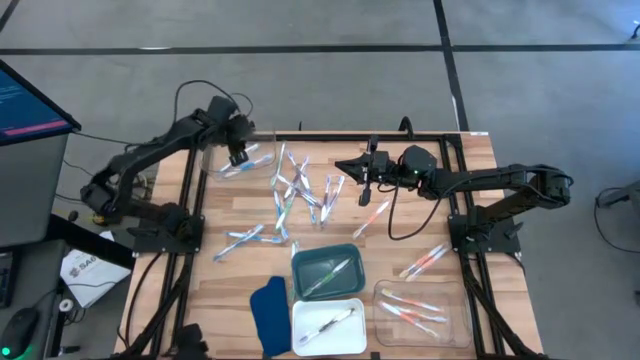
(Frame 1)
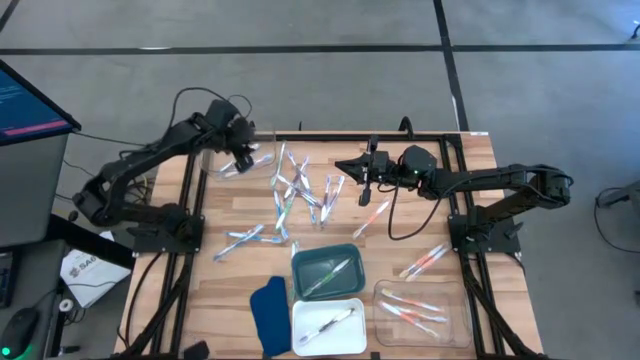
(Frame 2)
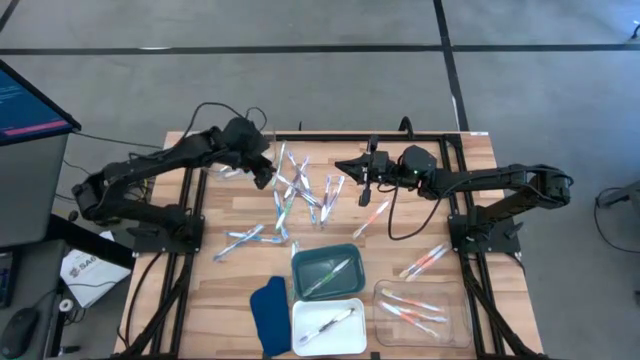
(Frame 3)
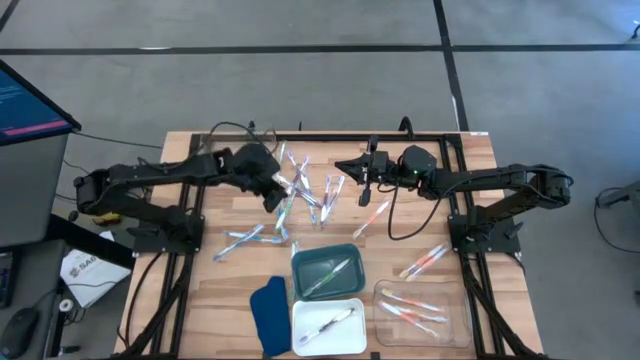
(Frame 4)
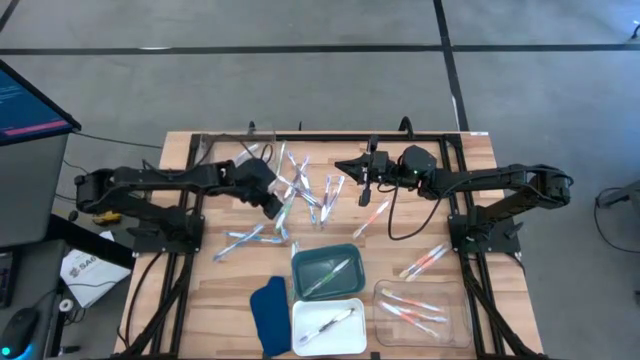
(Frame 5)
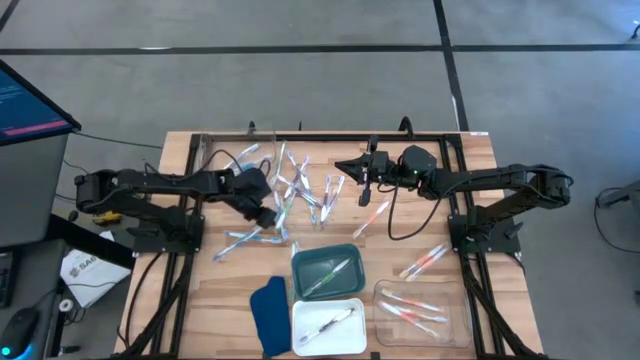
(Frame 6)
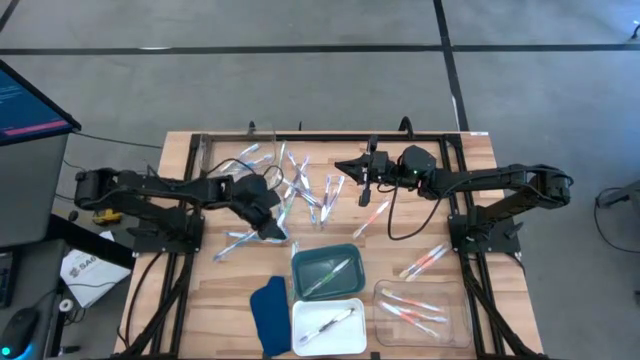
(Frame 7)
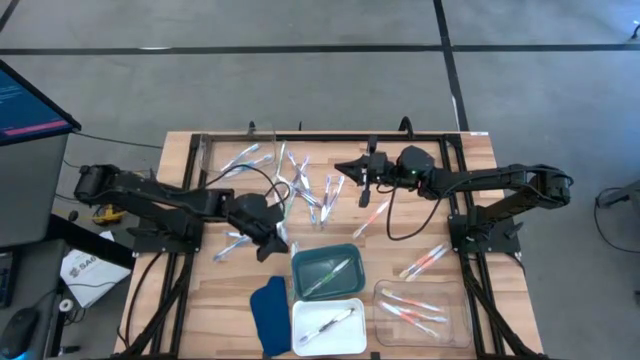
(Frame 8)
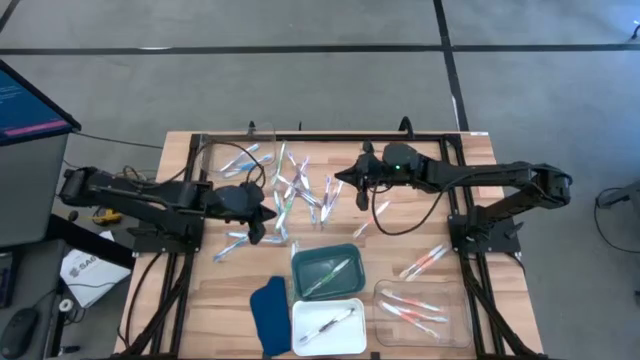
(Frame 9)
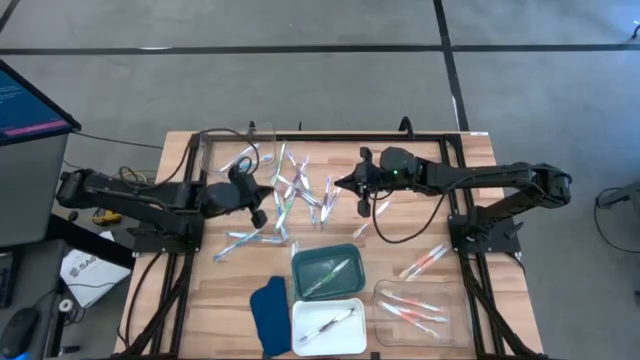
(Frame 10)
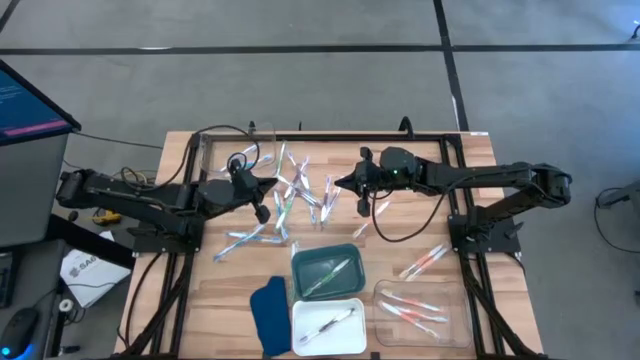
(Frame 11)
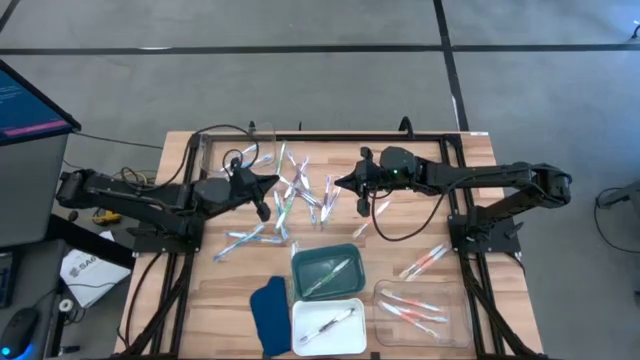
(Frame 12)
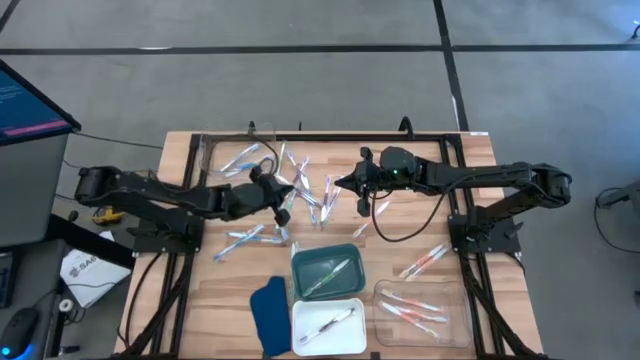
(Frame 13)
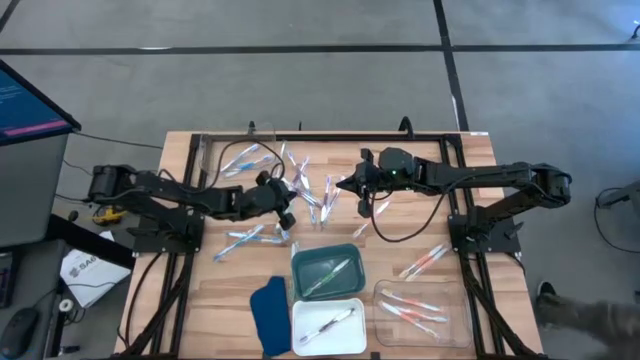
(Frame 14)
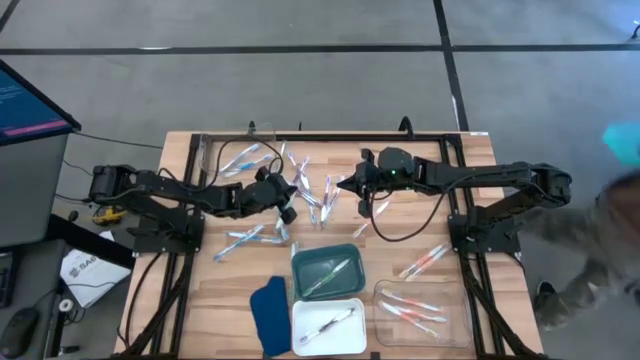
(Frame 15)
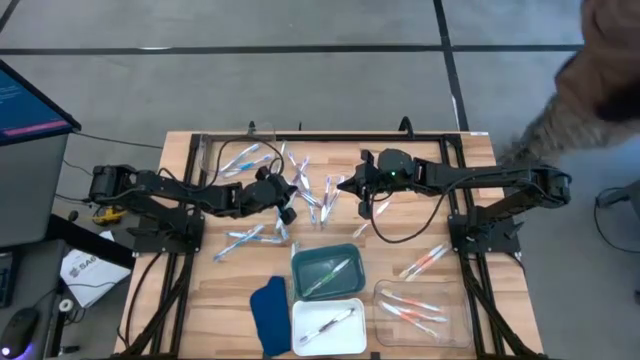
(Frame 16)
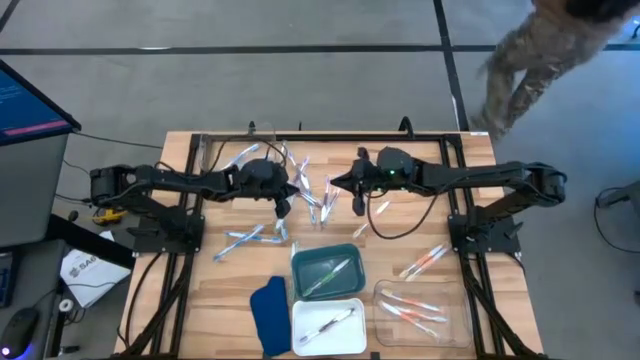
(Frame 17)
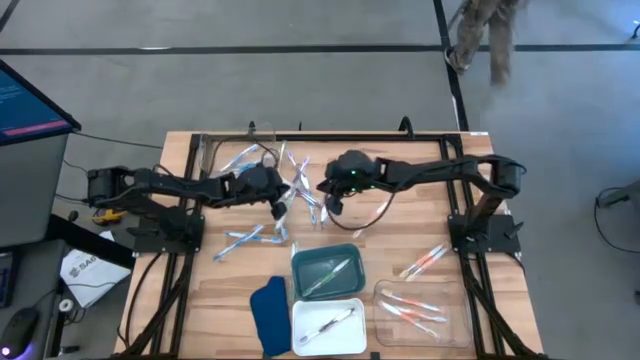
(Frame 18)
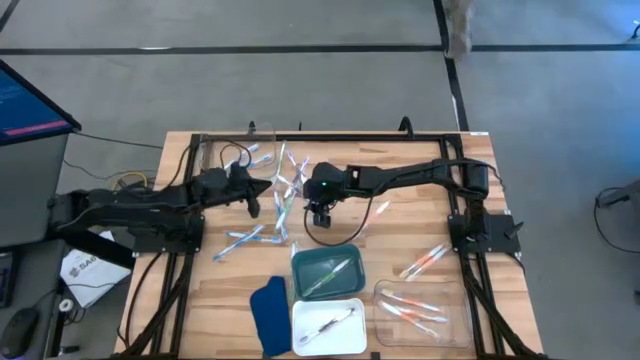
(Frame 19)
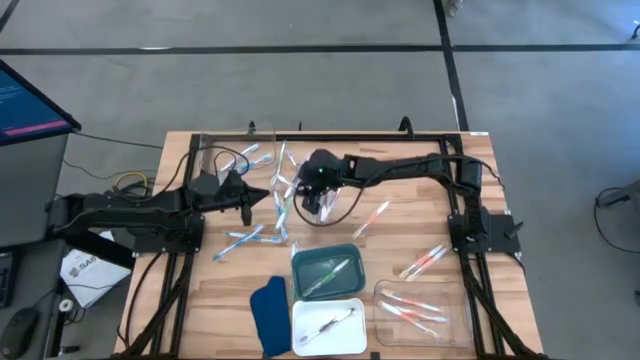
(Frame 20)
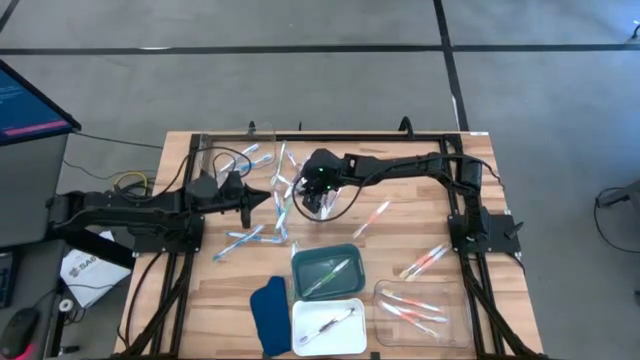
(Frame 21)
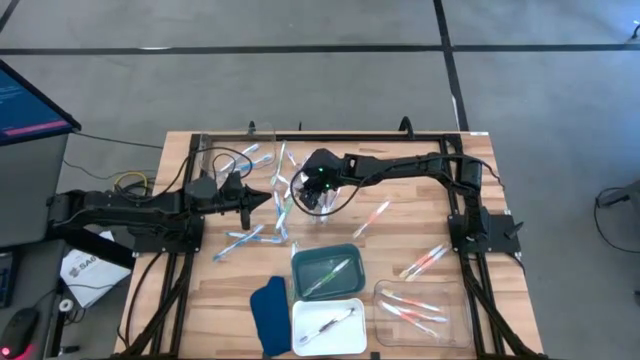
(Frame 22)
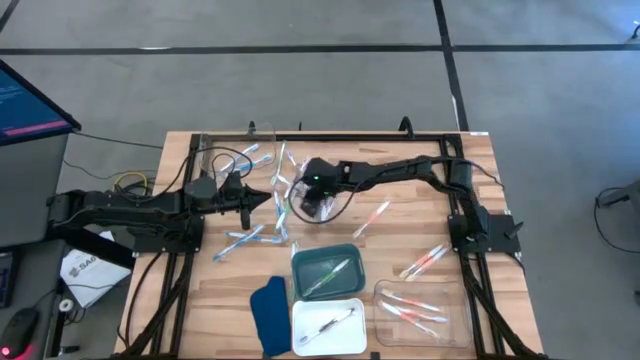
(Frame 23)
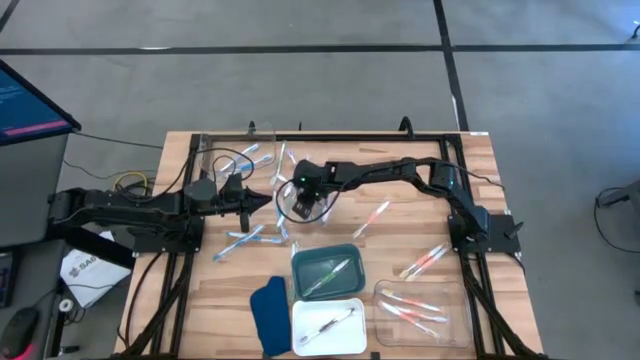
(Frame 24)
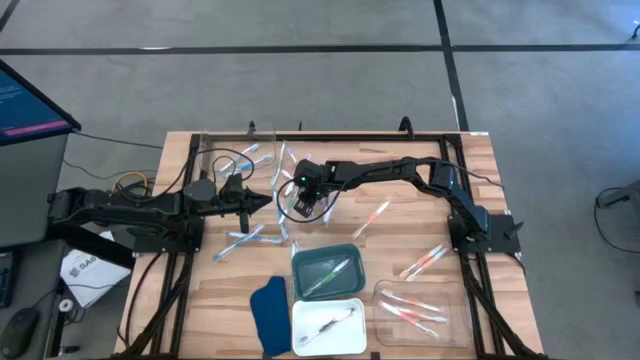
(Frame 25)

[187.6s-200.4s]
Task: Pick & Place Toothbrushes
Put the purple toothbrush into the white bin

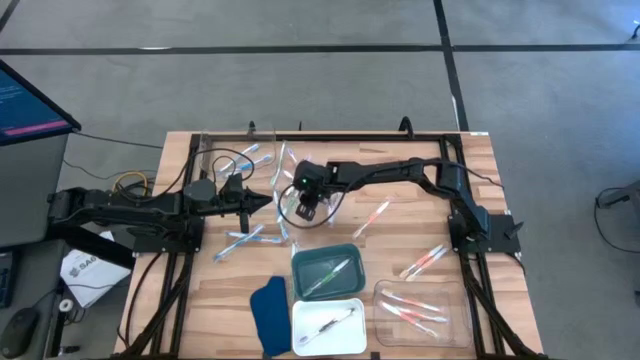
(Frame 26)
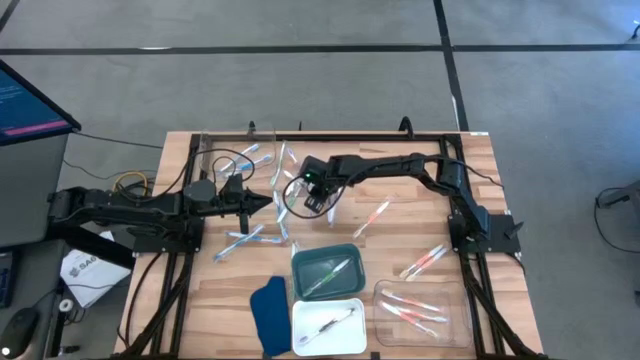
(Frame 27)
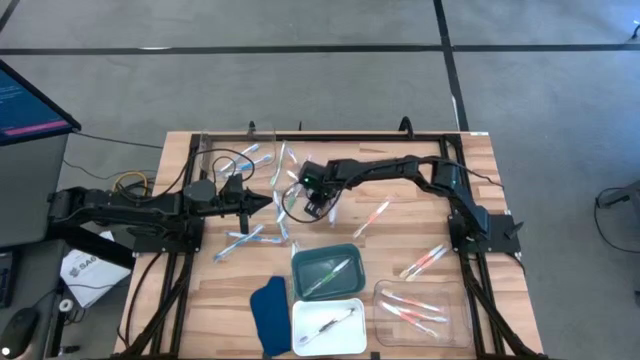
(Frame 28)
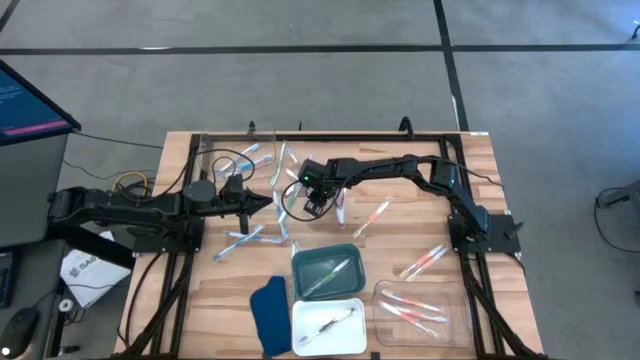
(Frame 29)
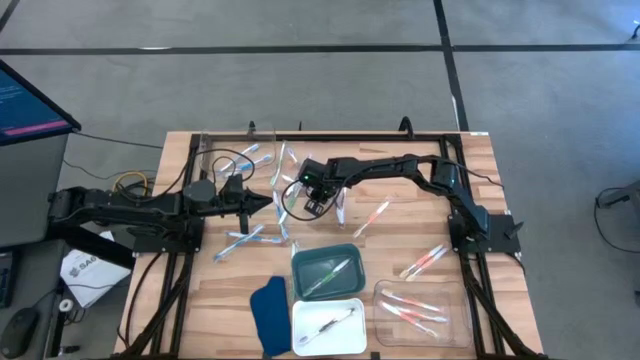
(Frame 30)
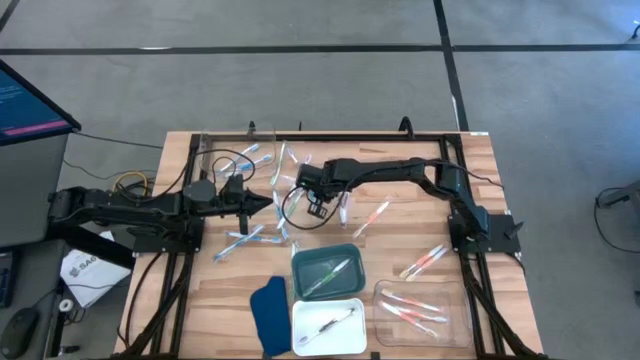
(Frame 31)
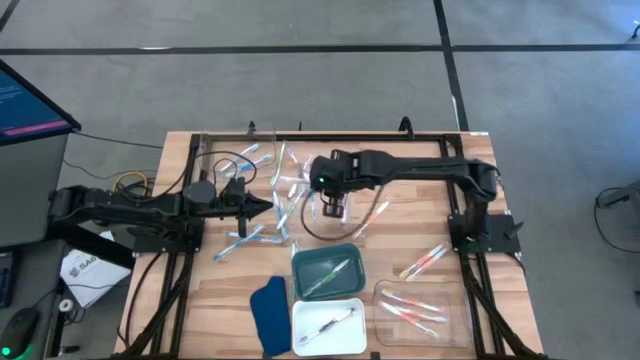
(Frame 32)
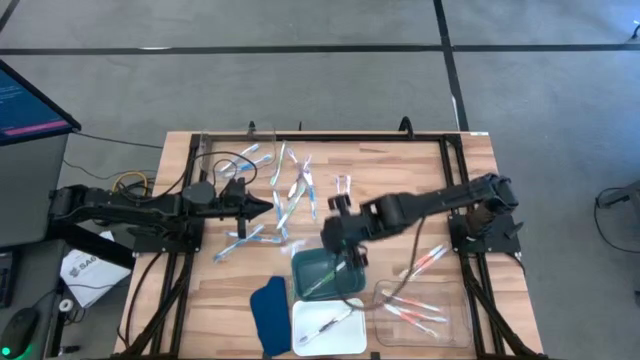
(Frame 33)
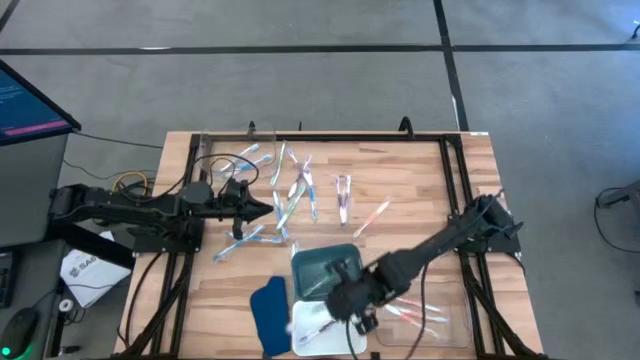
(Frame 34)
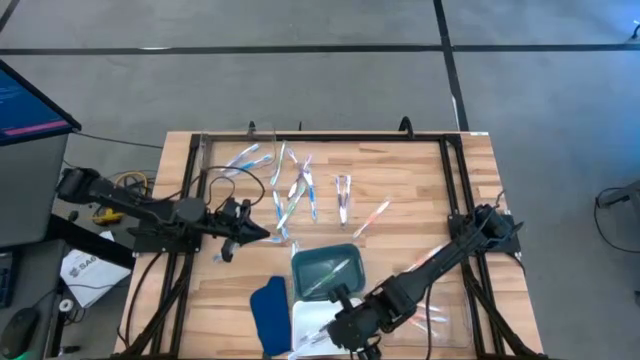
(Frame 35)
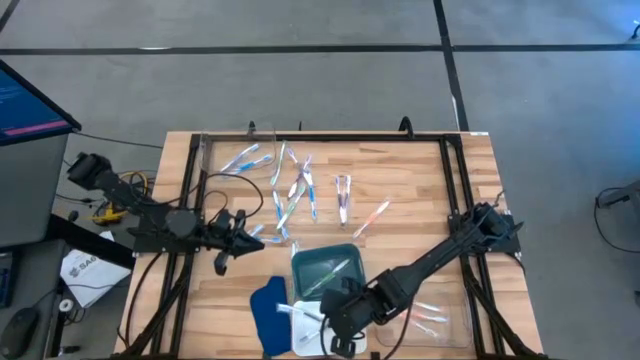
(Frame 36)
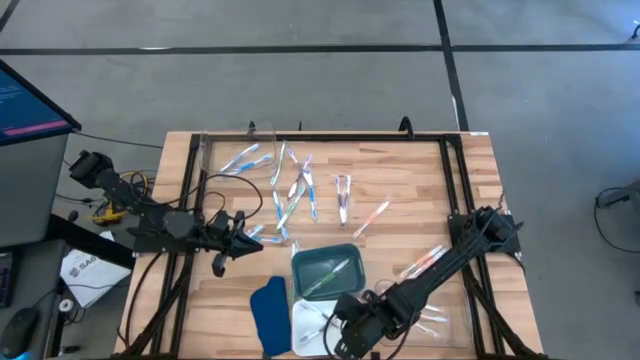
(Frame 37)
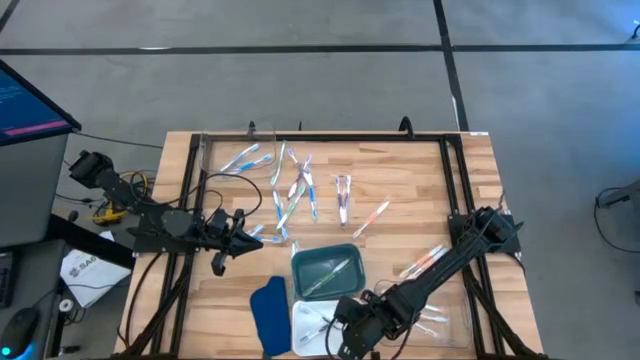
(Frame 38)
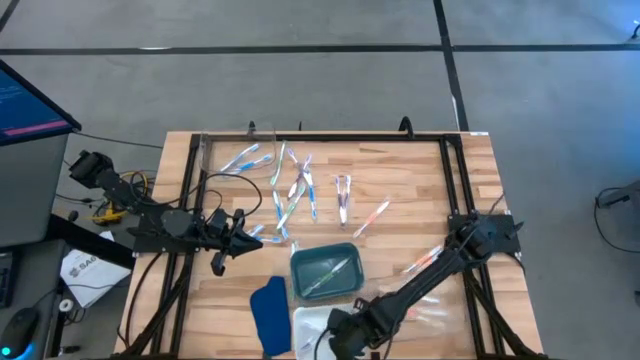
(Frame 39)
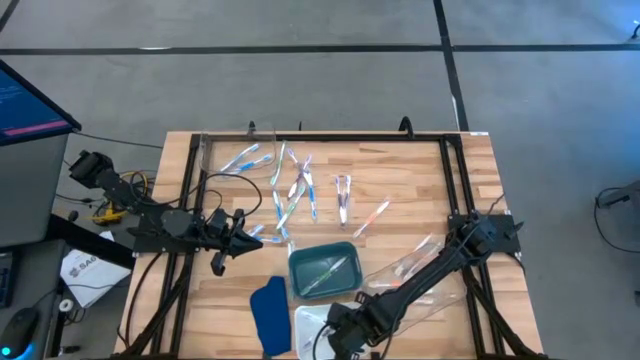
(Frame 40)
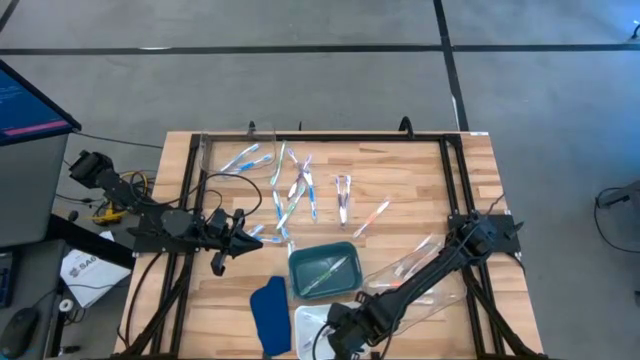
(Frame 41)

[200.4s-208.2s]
Put the purple toothbrush into the white bin
